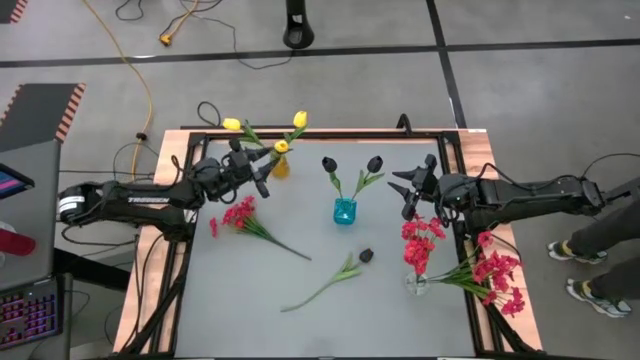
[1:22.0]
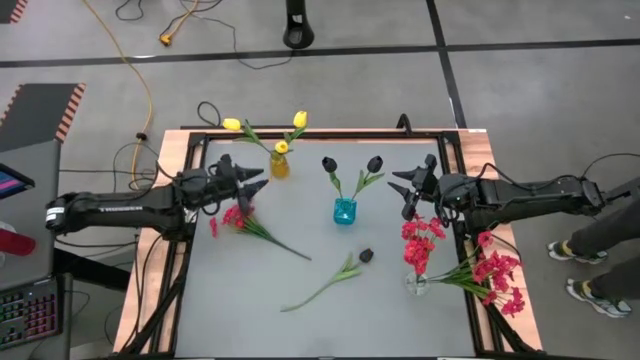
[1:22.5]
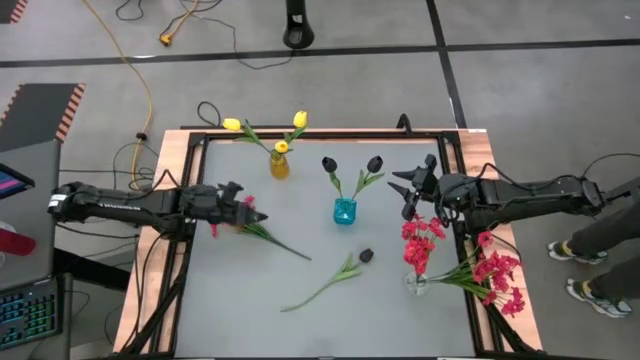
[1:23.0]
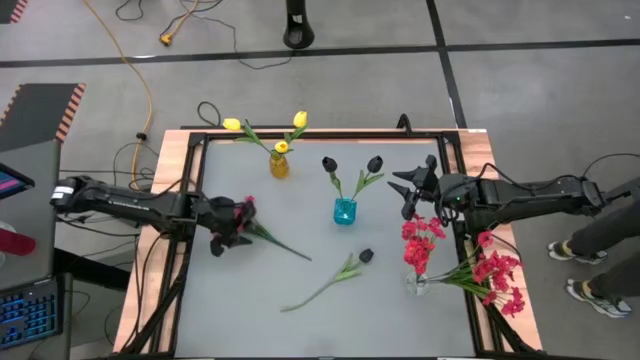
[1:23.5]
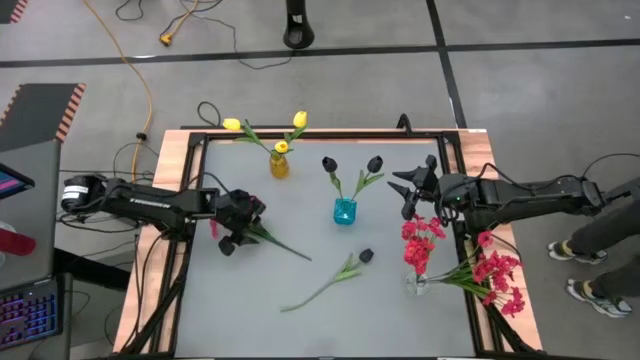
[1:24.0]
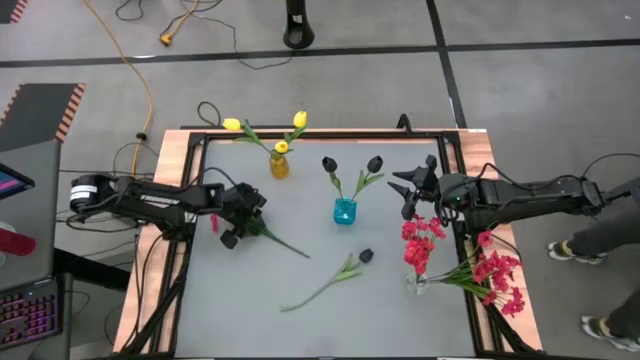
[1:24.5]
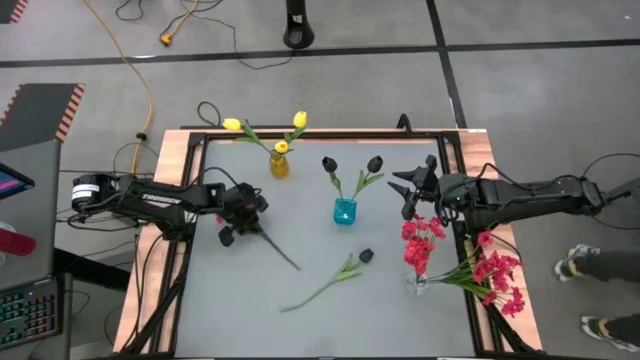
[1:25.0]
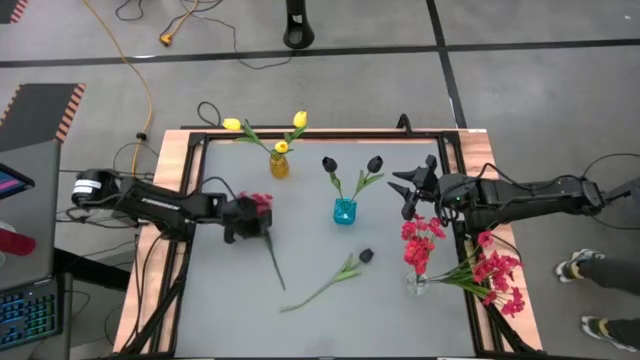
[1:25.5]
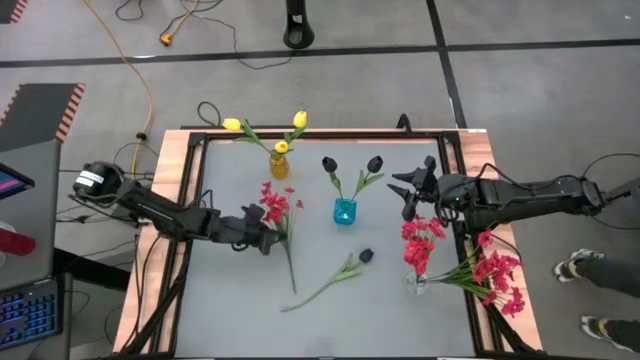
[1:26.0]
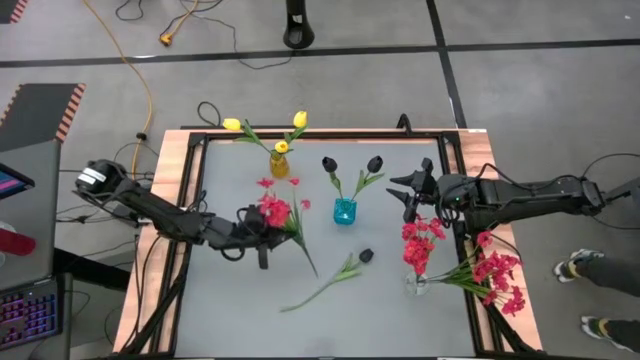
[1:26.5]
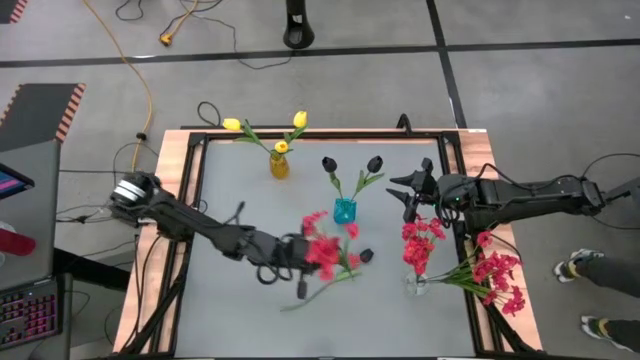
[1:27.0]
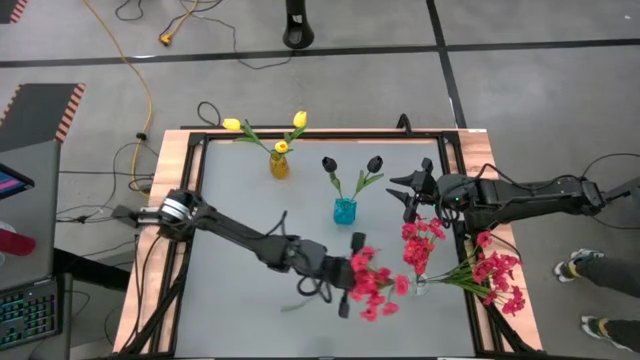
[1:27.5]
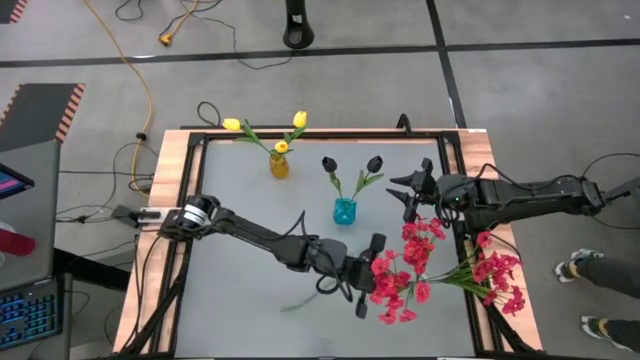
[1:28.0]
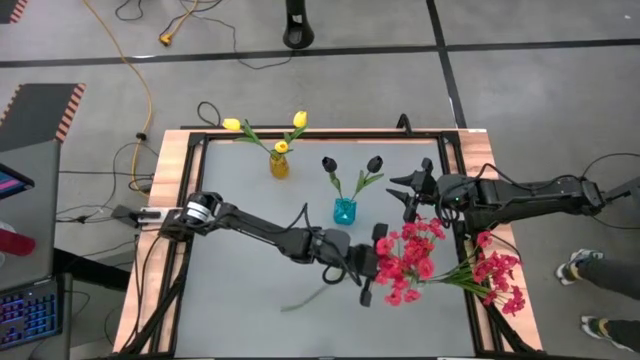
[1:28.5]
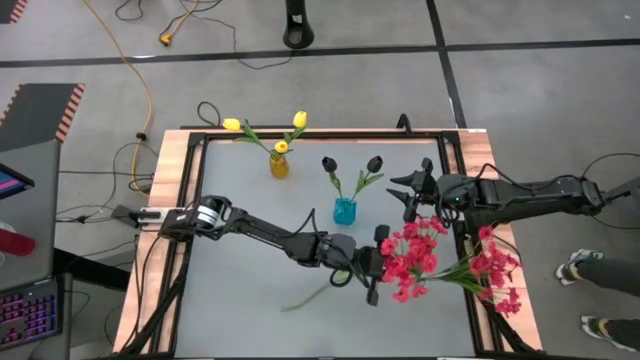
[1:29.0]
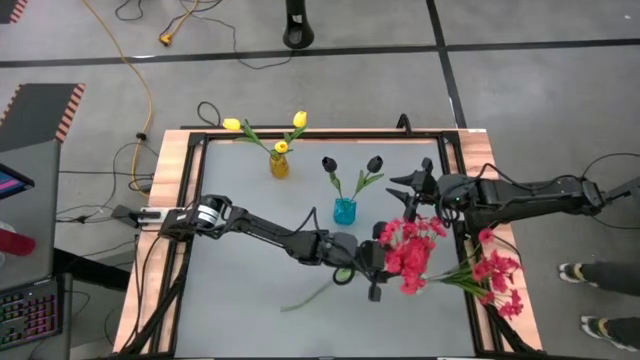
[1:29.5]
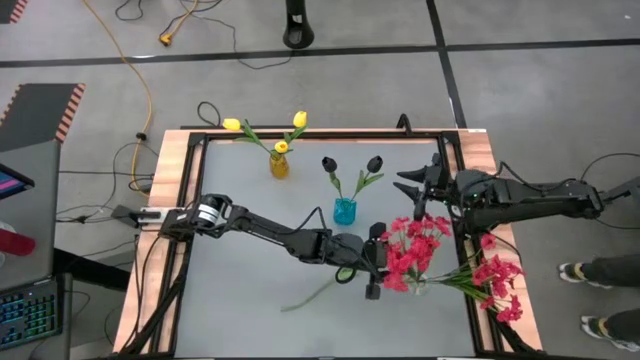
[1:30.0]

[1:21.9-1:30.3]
Task: Sort flowers into vase by color
Put the red flowers into the transparent vase

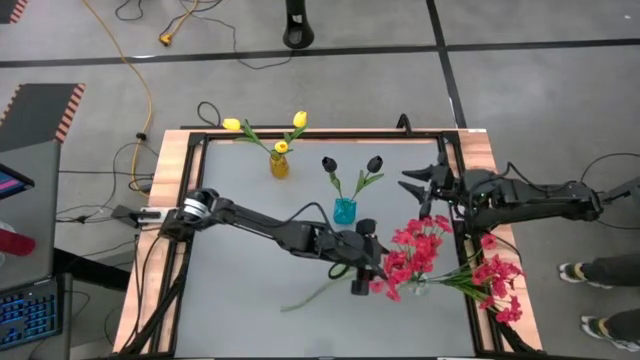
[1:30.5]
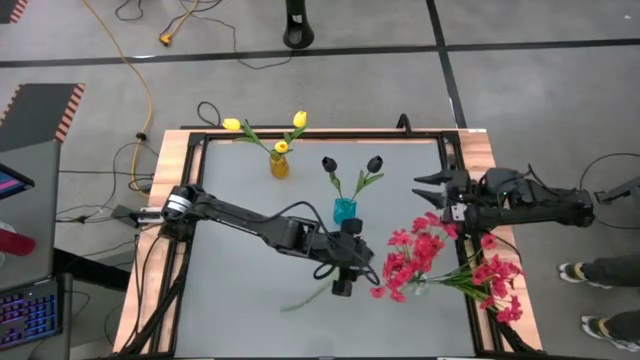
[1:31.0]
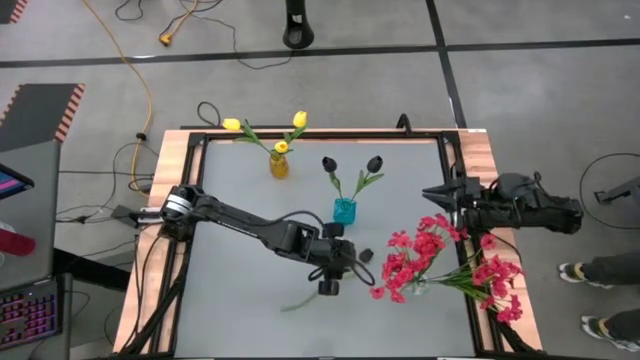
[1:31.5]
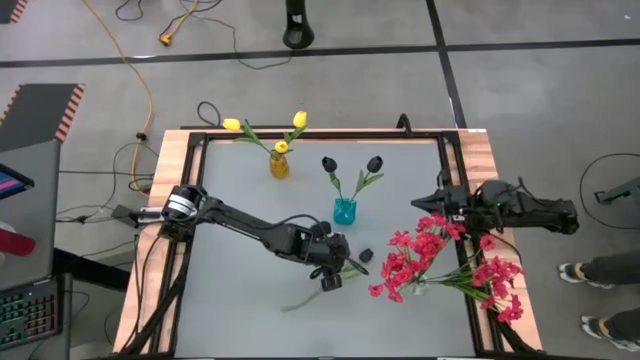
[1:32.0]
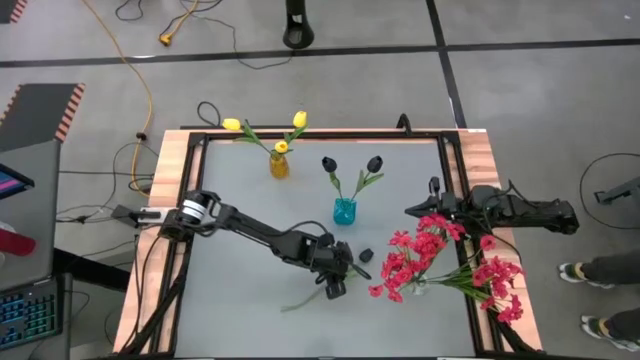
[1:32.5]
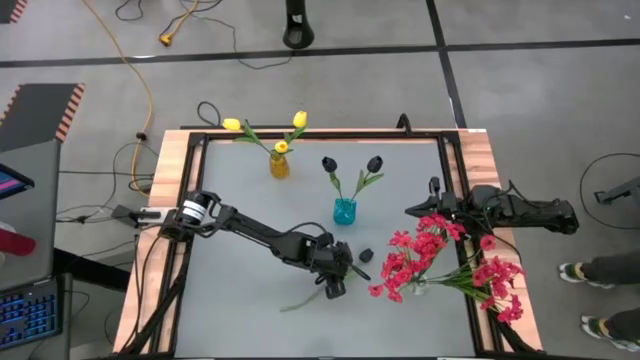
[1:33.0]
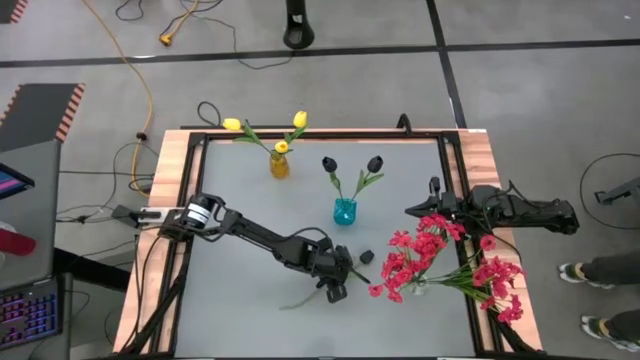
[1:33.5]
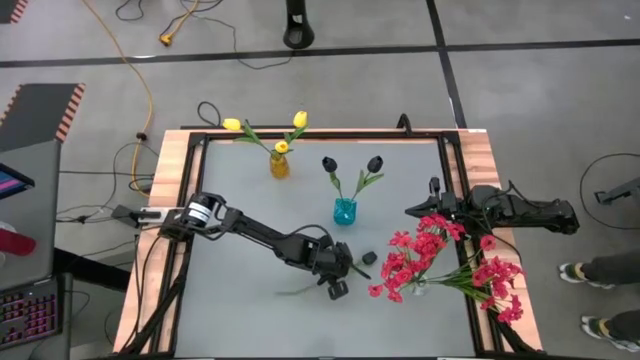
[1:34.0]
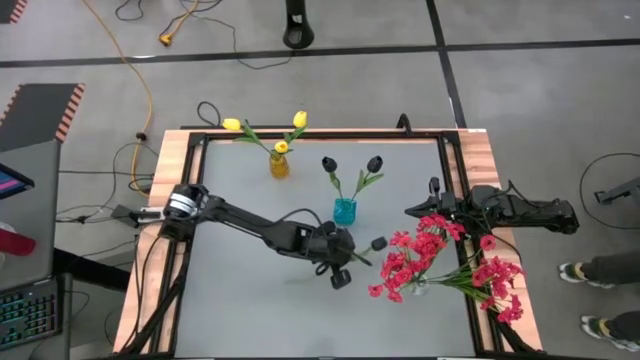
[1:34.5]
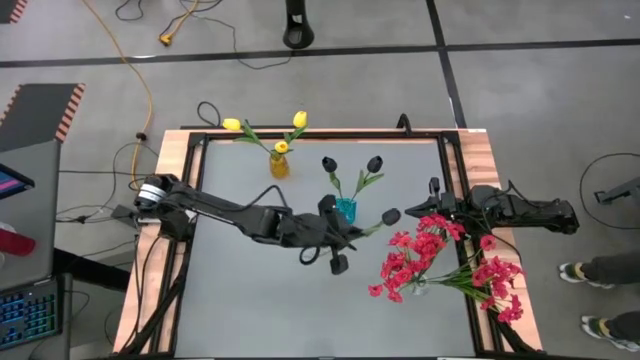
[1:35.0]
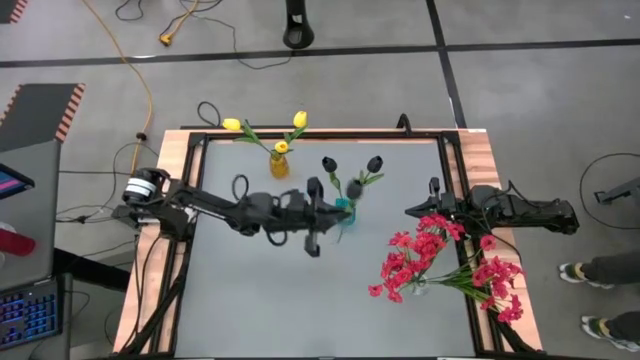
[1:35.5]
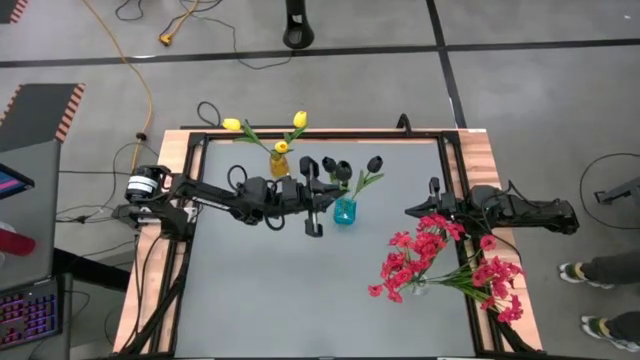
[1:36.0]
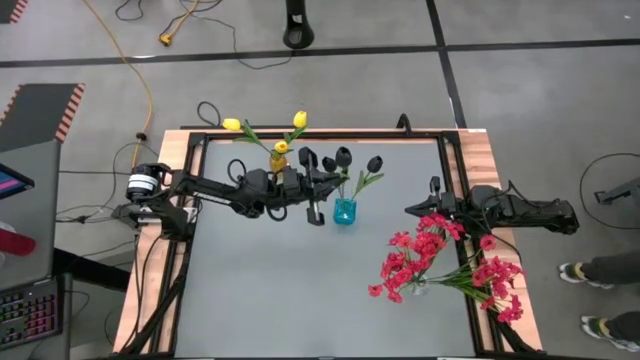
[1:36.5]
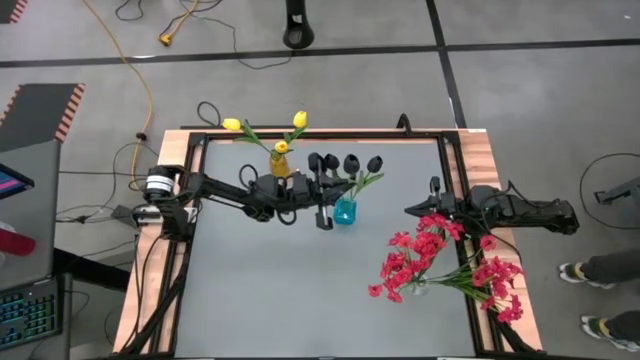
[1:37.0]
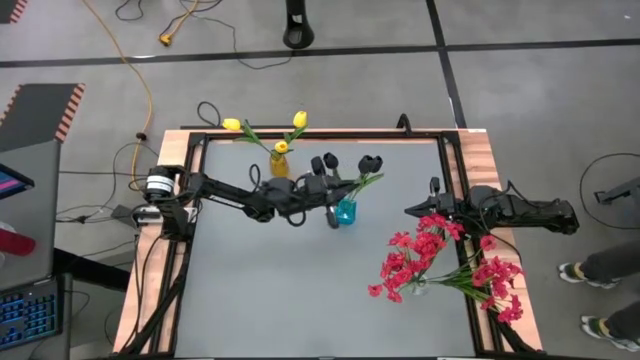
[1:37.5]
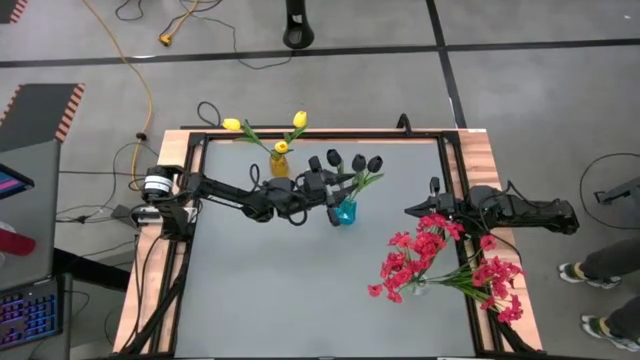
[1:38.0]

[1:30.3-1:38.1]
Put the black flower into the blue vase

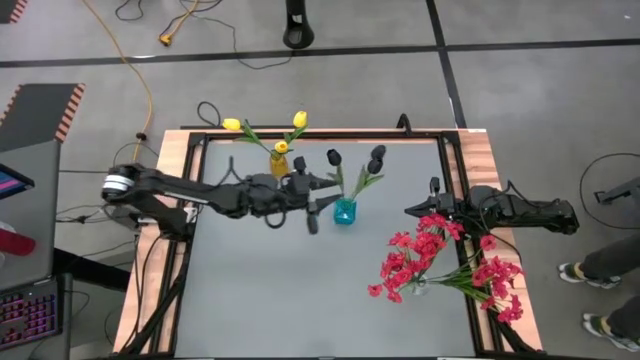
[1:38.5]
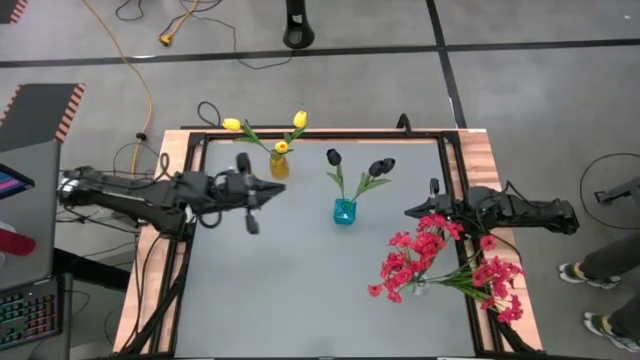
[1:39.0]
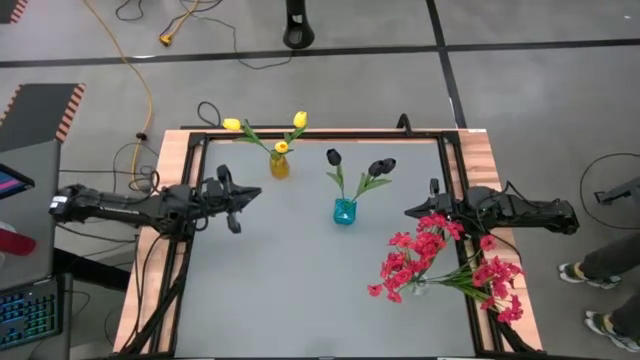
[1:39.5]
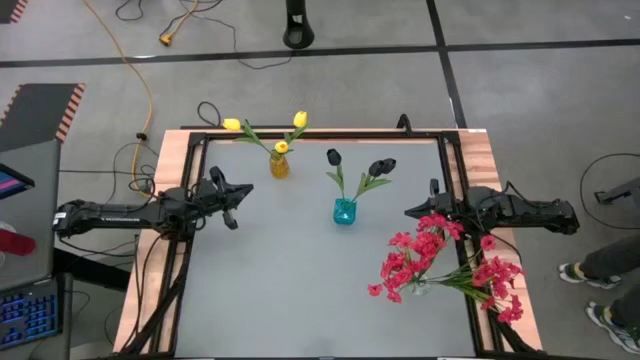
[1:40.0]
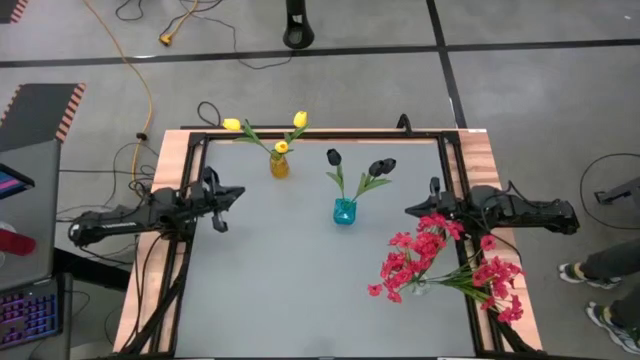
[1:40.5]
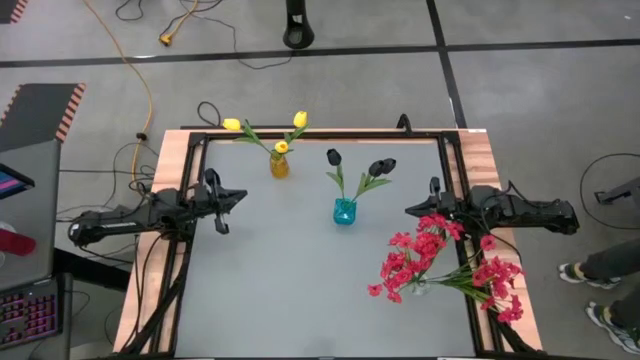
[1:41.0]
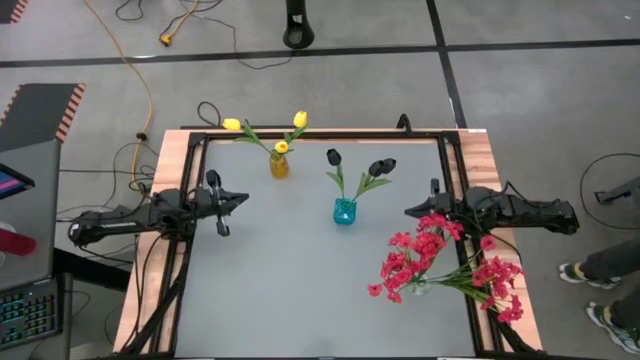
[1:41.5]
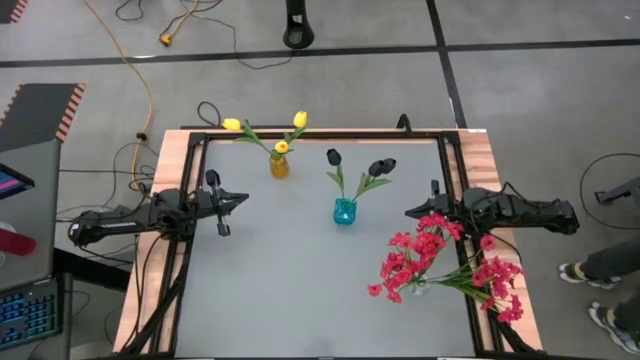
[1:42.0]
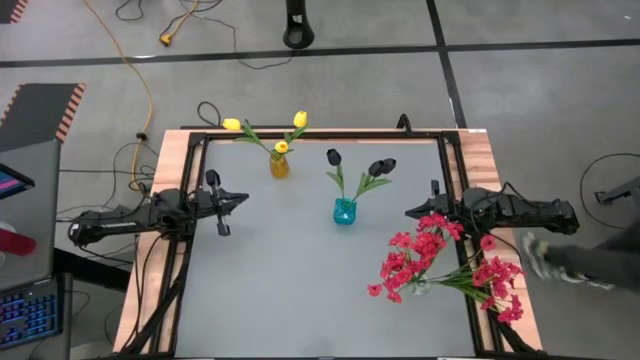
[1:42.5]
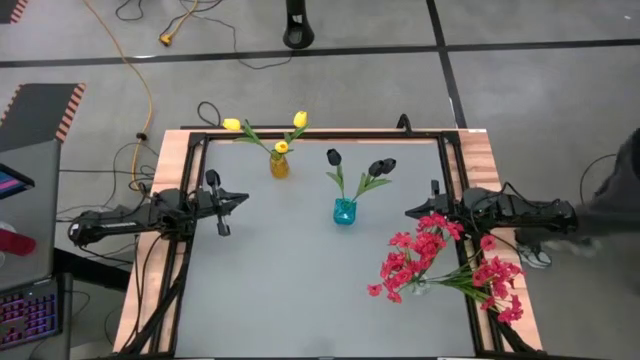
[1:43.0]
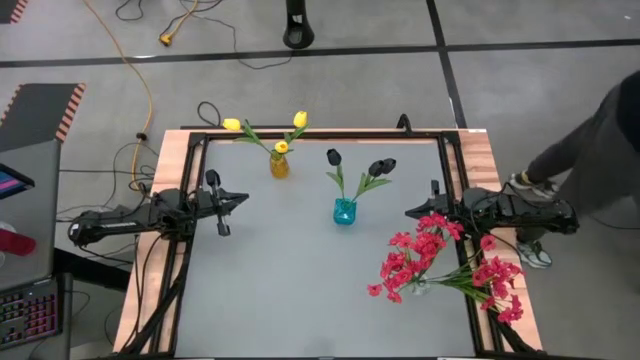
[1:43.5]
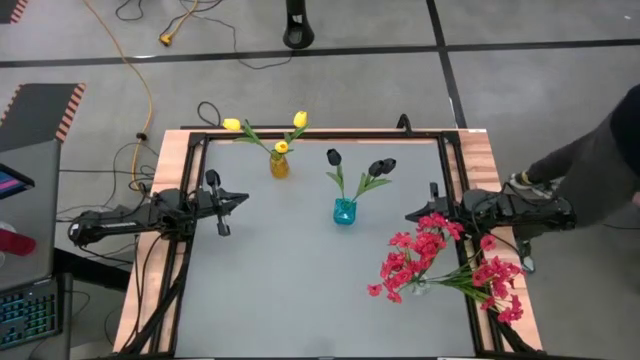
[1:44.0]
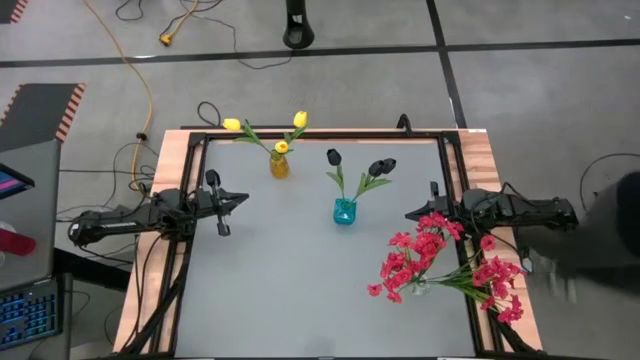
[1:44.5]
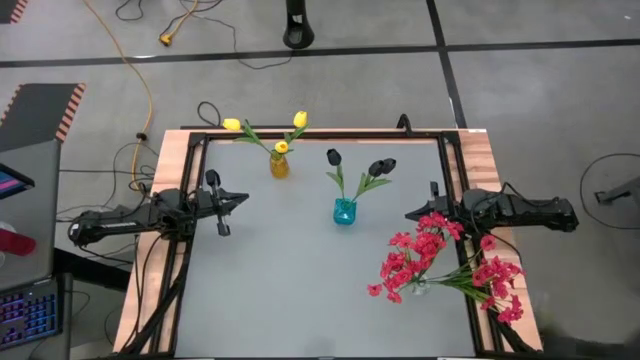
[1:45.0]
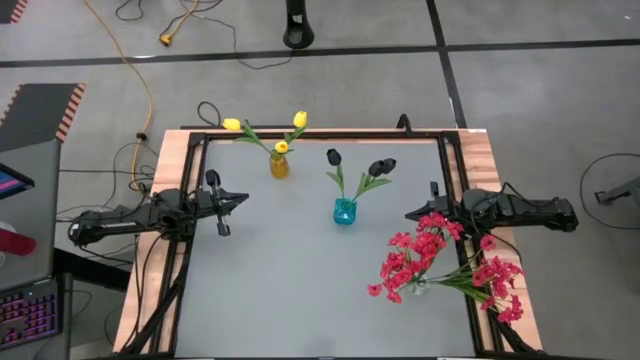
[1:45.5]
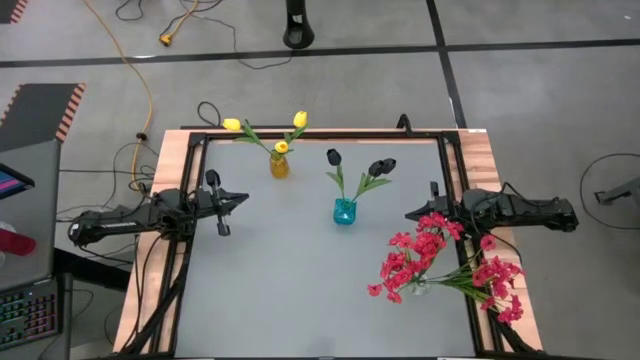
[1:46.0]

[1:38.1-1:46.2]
Return to Home Position
